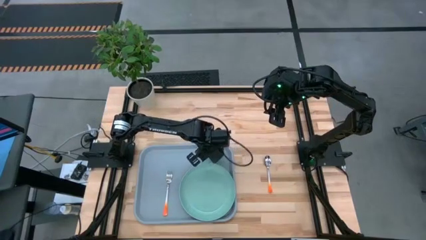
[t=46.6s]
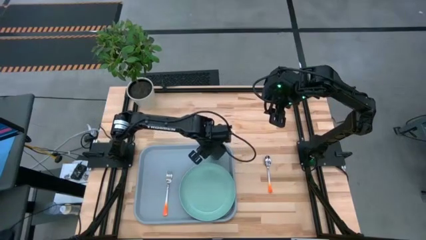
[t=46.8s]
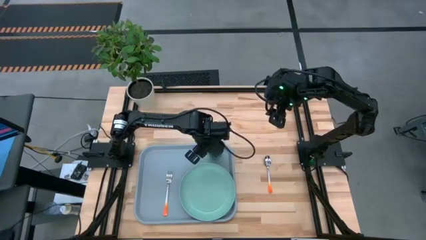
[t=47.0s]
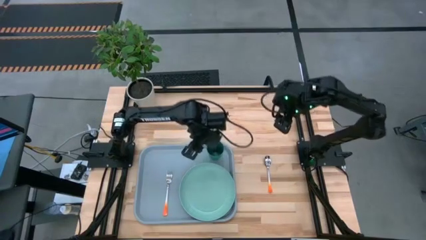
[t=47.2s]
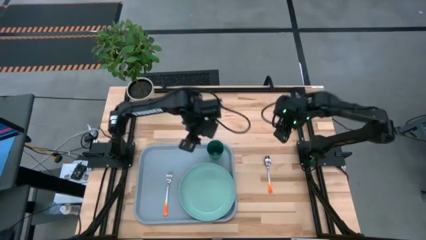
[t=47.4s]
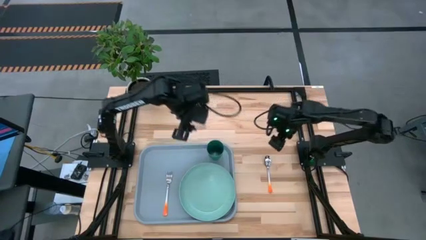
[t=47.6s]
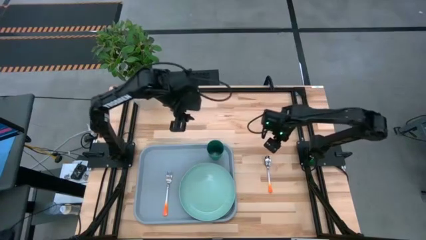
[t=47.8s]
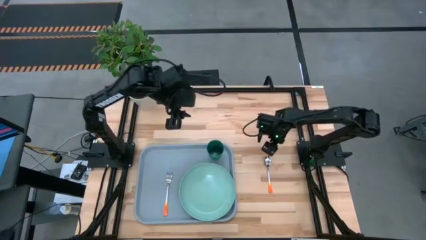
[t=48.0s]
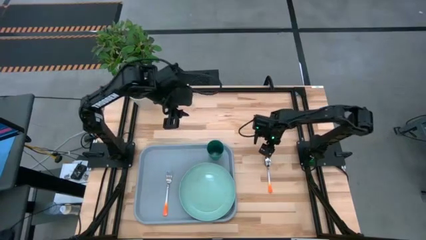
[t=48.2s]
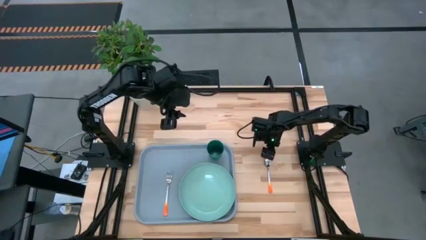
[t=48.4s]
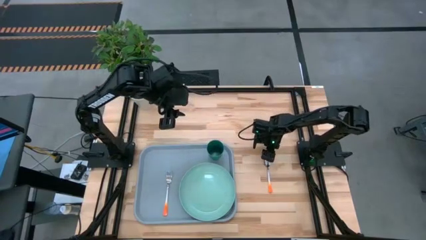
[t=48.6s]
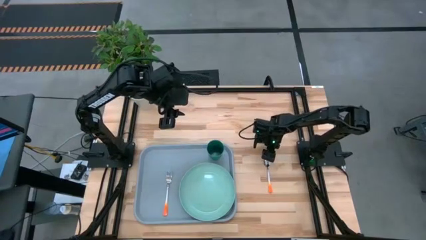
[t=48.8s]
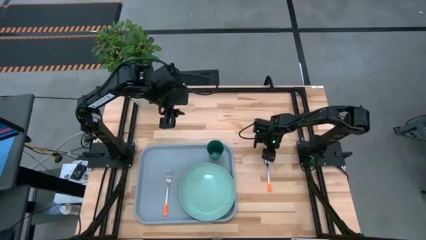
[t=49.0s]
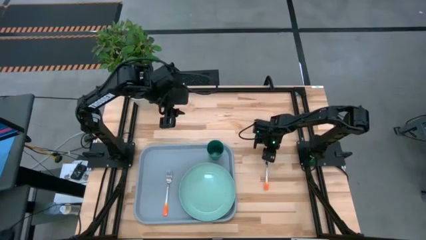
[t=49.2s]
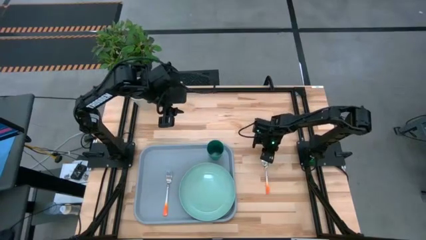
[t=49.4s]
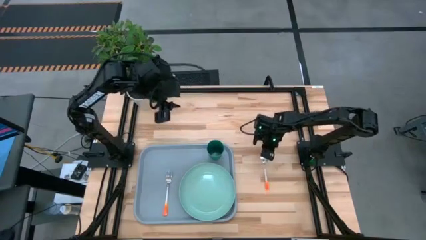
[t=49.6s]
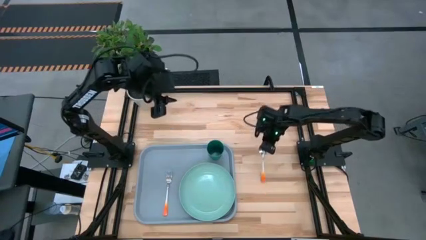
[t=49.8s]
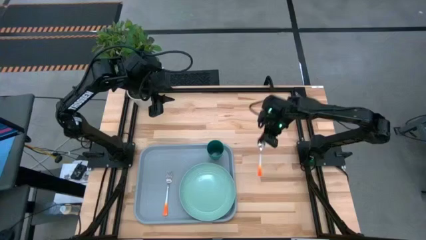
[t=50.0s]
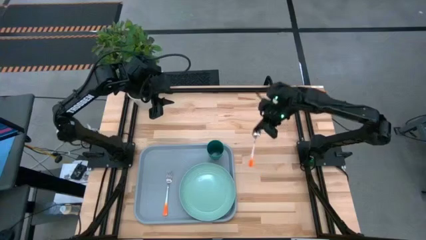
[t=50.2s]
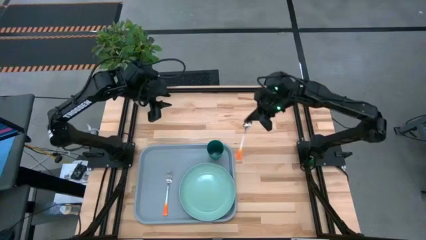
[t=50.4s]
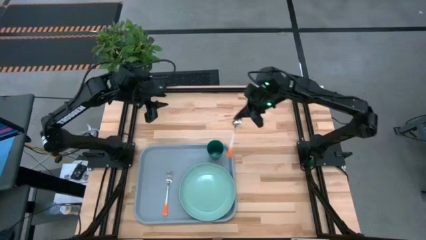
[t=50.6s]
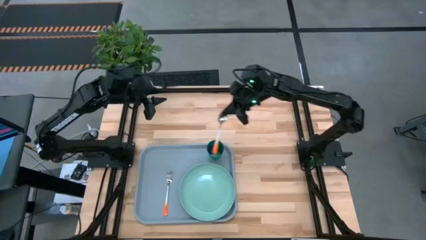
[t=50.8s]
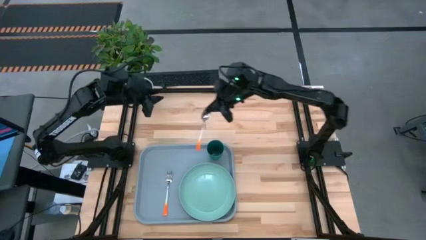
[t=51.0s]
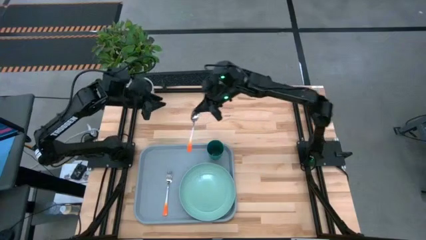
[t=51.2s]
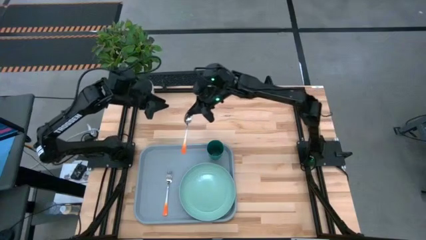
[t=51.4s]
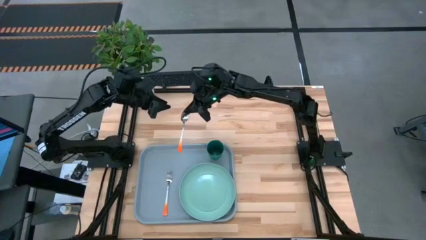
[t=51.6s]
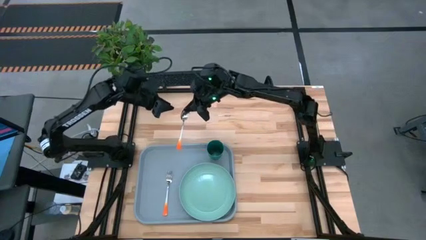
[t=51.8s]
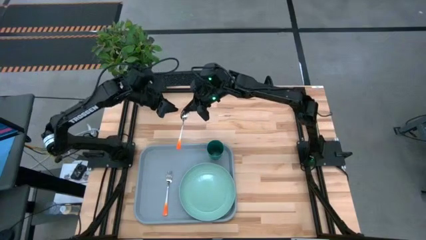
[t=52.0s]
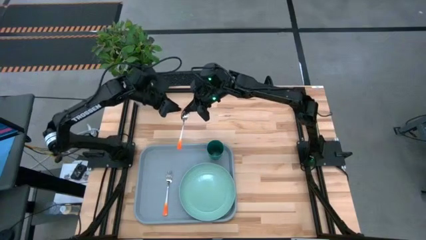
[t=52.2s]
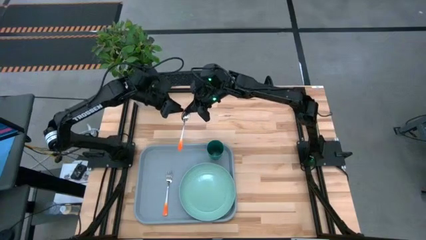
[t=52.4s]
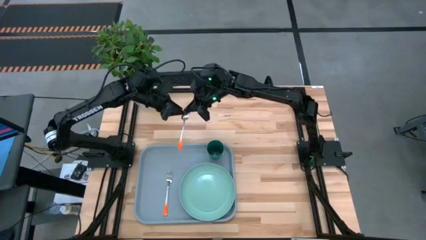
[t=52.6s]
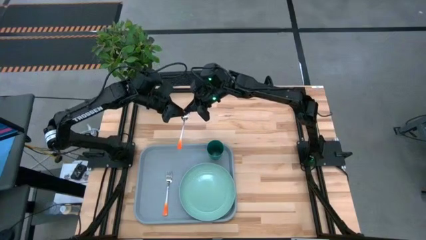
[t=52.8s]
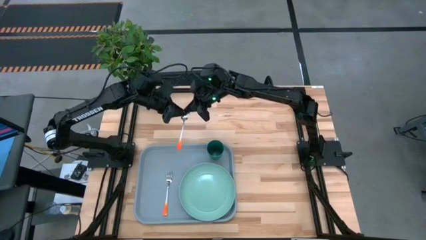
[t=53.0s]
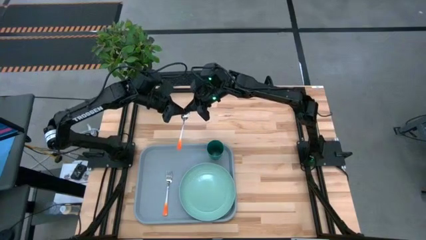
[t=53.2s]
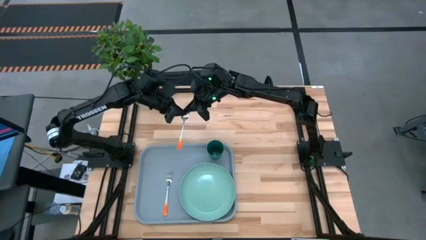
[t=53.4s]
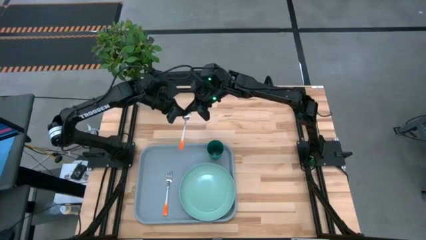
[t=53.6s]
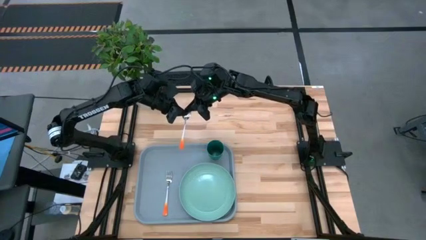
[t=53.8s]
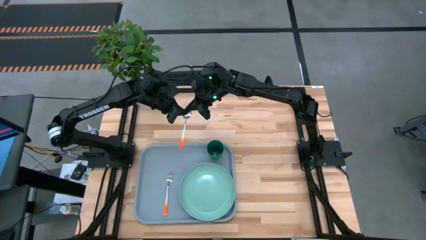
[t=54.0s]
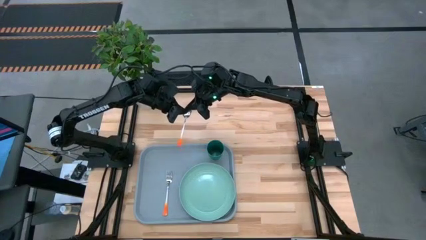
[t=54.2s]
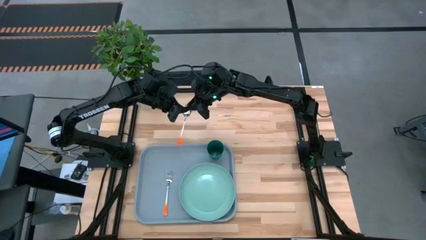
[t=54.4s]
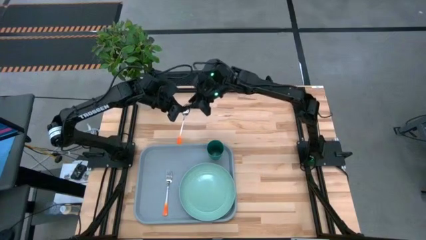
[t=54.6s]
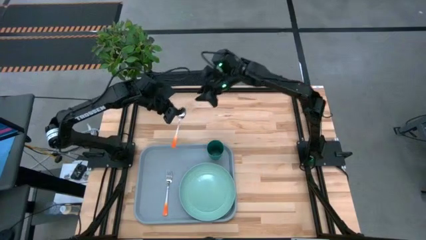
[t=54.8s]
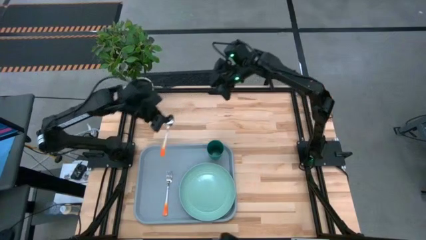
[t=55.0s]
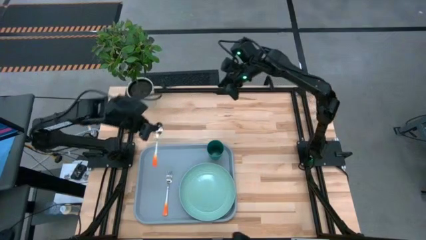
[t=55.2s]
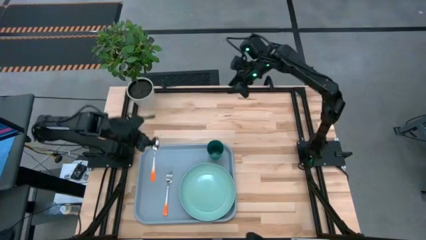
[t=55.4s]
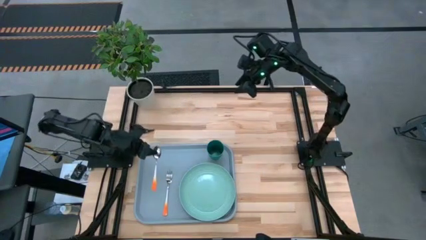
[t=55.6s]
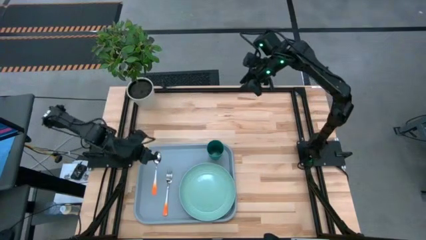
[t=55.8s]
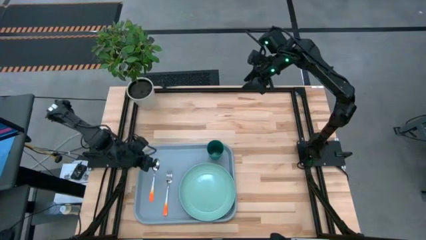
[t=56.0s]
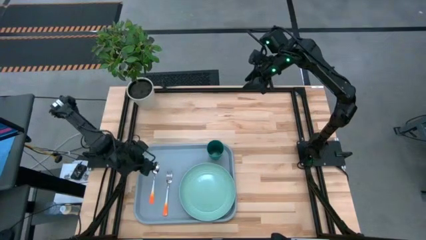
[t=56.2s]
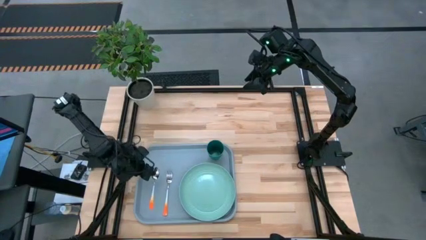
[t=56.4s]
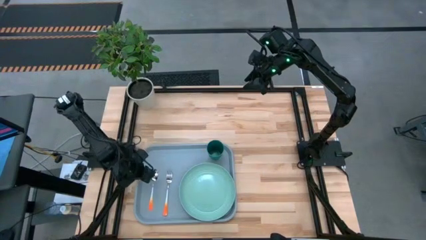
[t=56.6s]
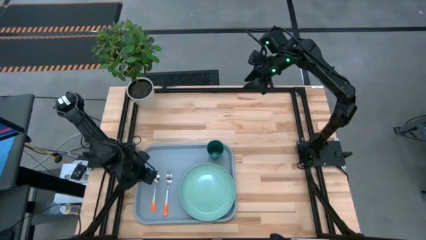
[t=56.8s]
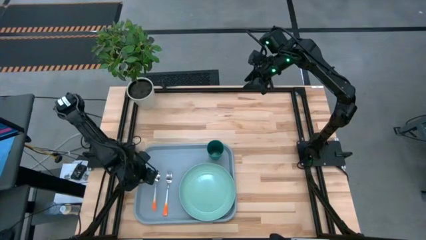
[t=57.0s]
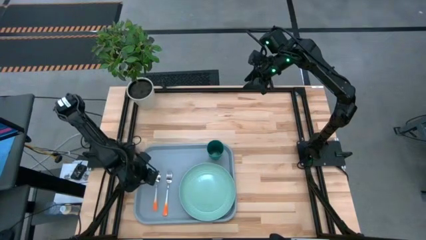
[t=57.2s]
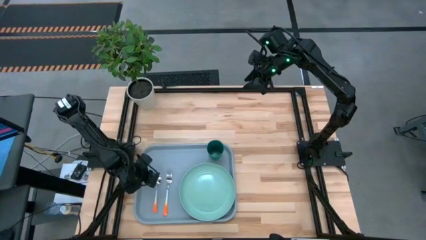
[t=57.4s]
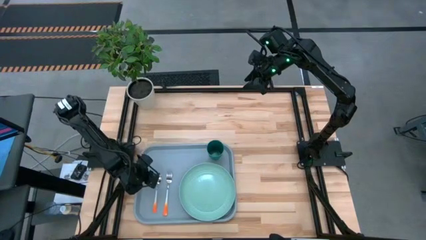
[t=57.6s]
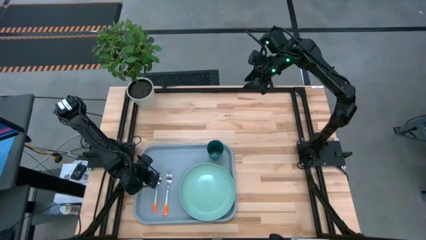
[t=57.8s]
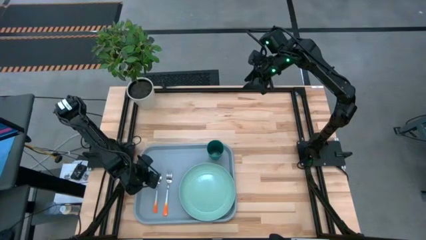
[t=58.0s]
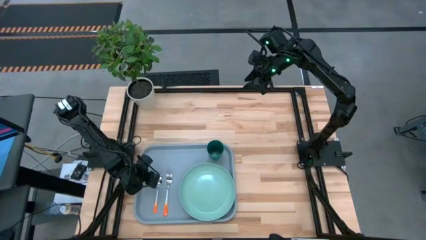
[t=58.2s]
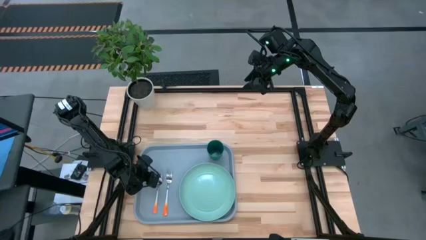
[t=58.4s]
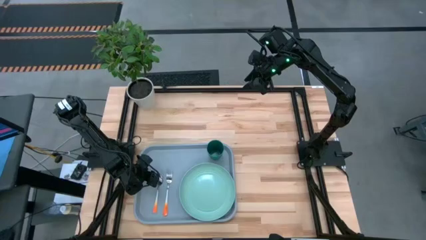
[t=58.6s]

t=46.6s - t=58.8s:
Task: Pick and place plate/cup/fork/spoon on tray
Put the orange spoon to the left side of the orange fork on the blue serving tray
